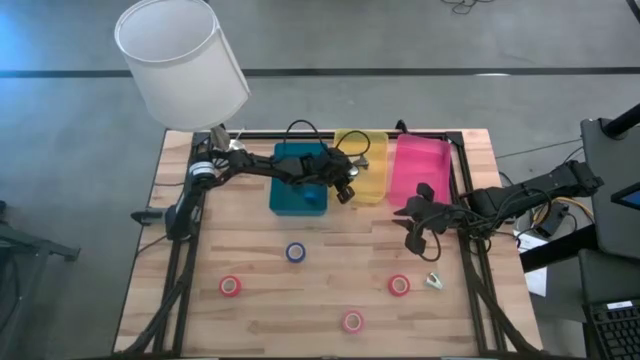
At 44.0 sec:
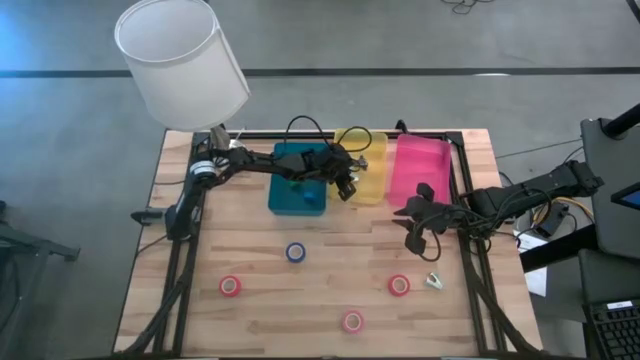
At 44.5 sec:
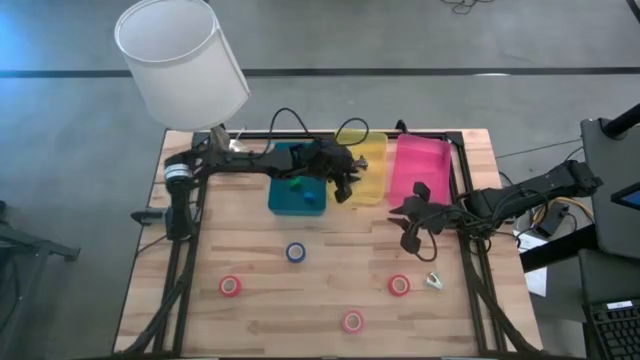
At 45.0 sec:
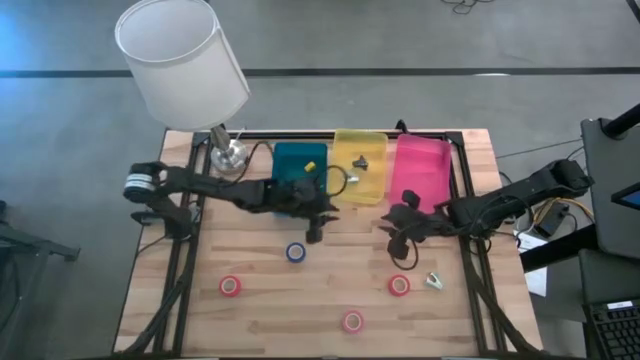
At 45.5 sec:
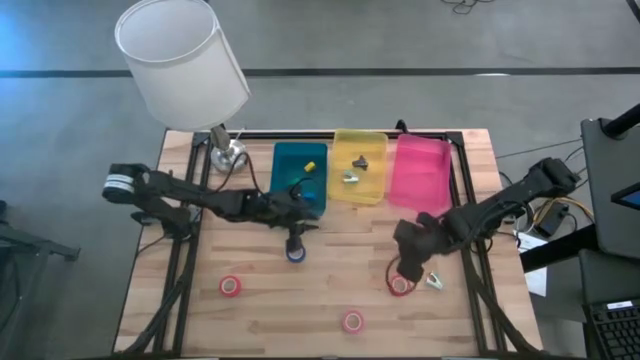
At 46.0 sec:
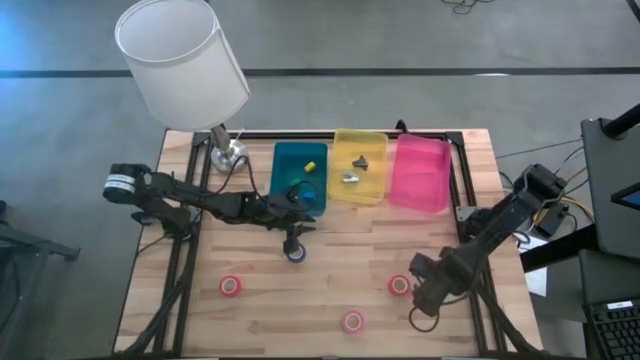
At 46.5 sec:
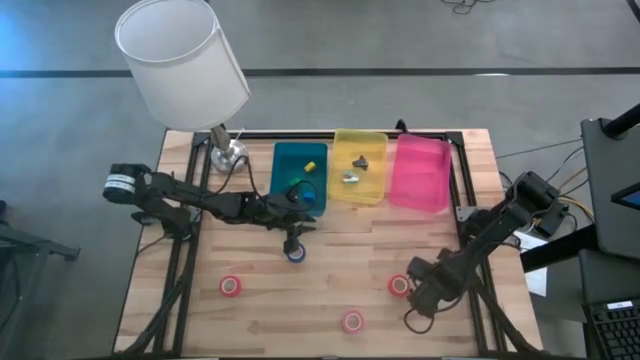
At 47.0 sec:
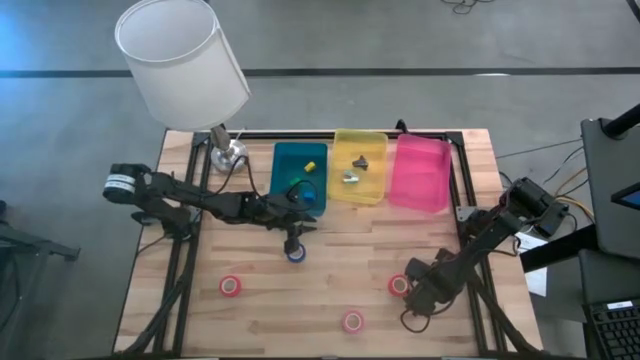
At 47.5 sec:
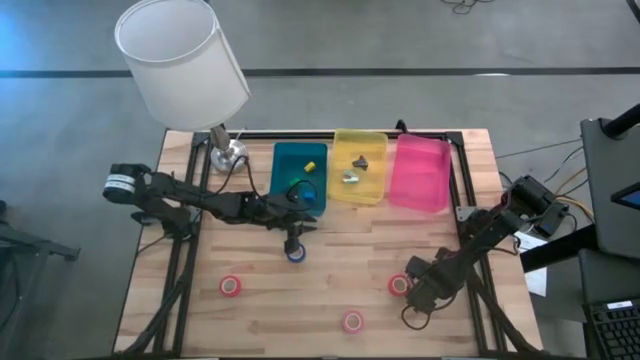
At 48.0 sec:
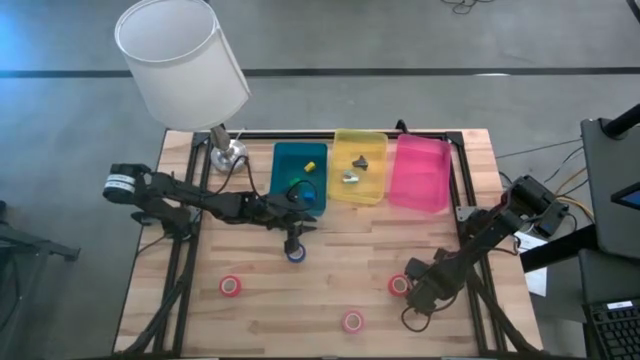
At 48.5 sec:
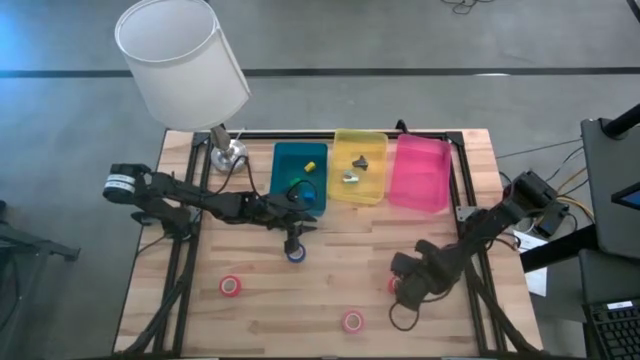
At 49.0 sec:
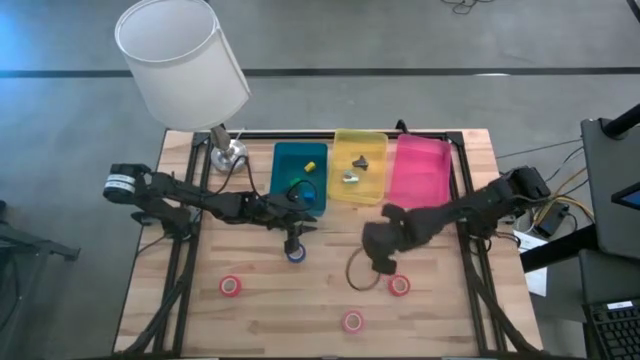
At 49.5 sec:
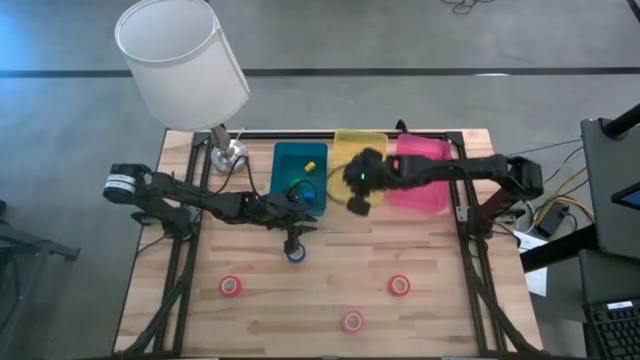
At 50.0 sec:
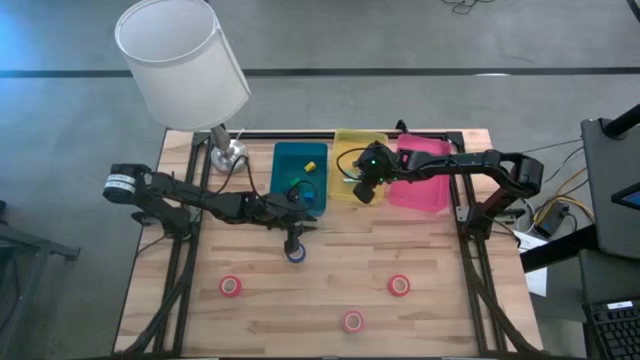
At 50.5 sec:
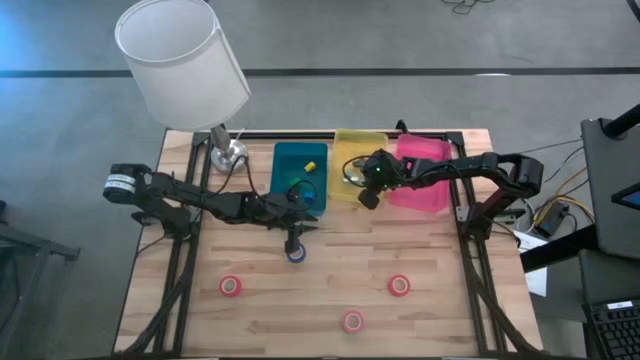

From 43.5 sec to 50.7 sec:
Task: Pick and place Stapler, Stapler remover, tape
Put the blue staple remover into the yellow bin

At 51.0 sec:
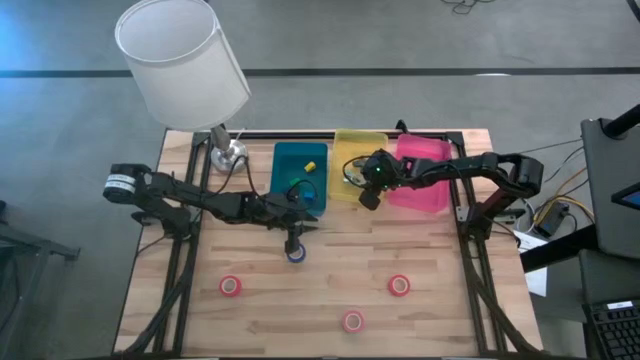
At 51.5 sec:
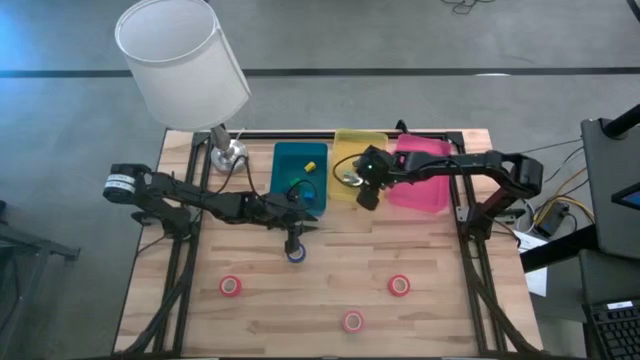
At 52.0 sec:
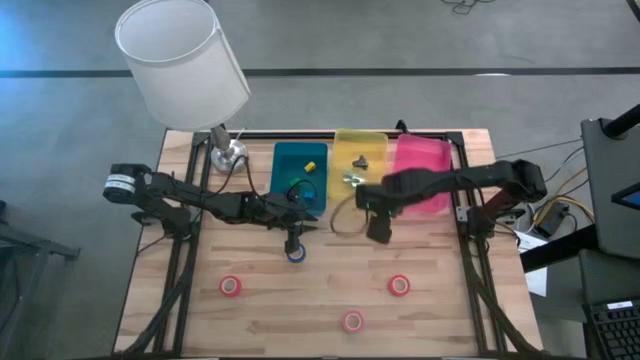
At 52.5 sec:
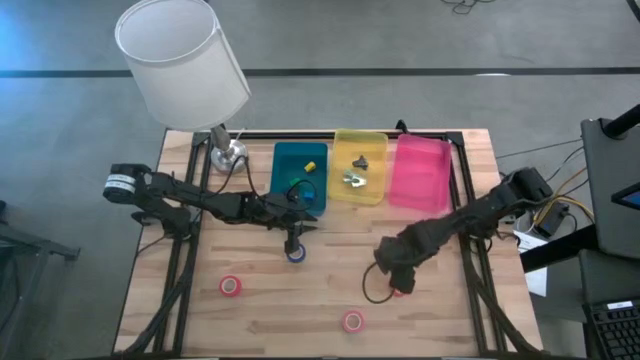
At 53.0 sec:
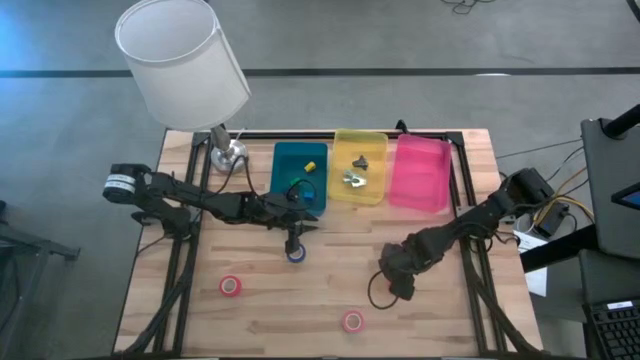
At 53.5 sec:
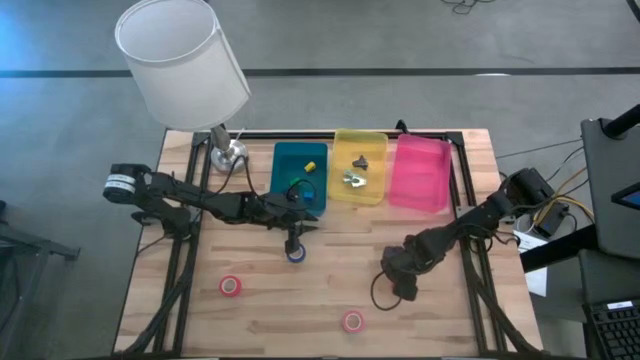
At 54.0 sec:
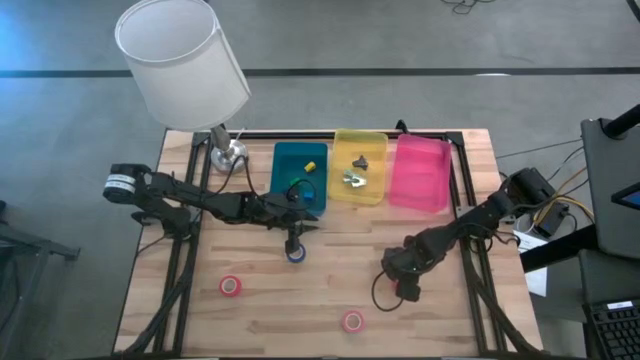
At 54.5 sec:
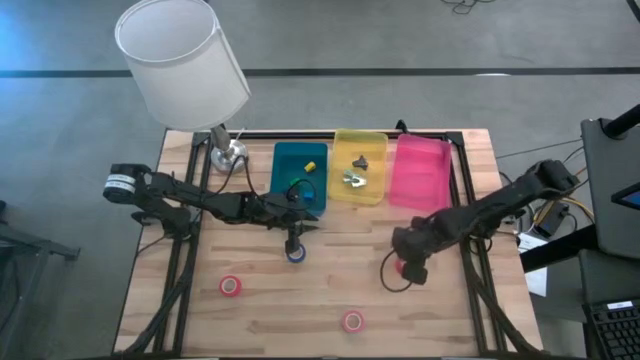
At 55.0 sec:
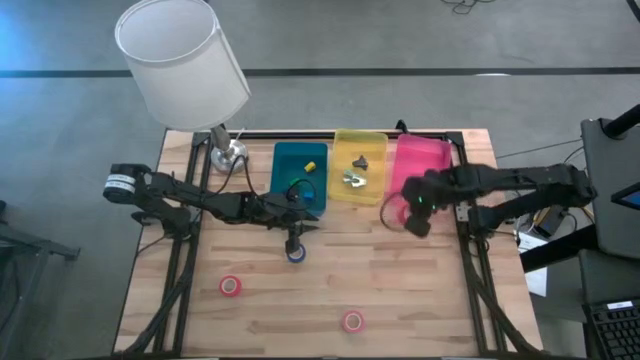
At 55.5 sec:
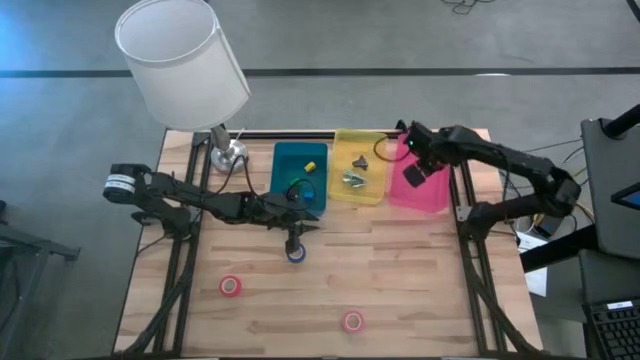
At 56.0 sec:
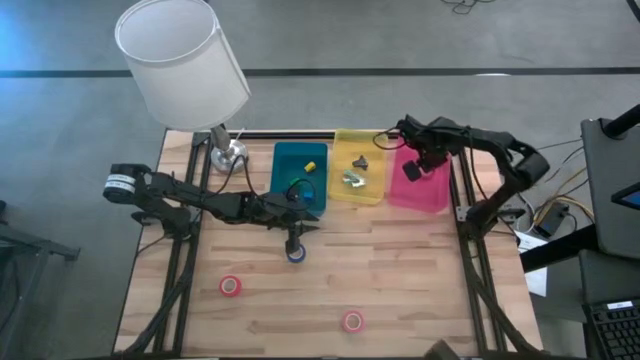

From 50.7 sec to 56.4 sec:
Put the right orange tape on the pink bin

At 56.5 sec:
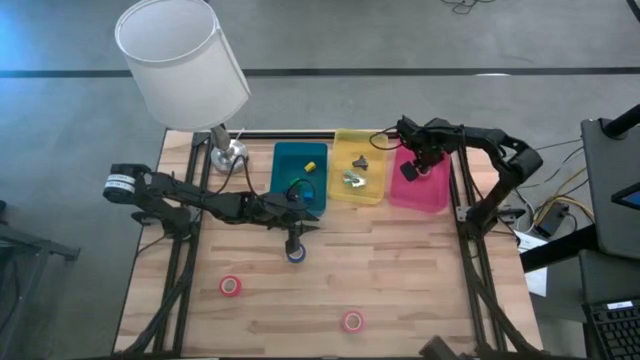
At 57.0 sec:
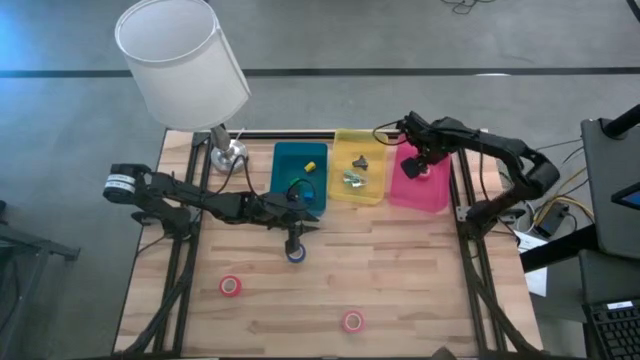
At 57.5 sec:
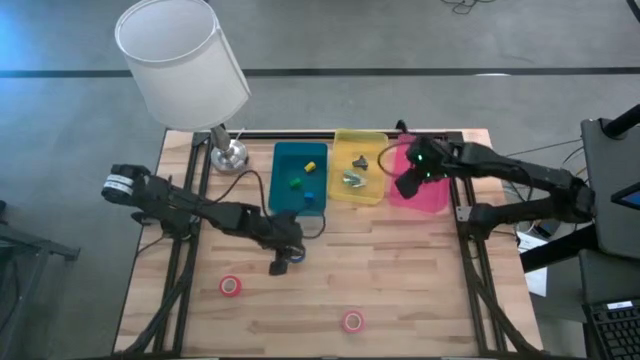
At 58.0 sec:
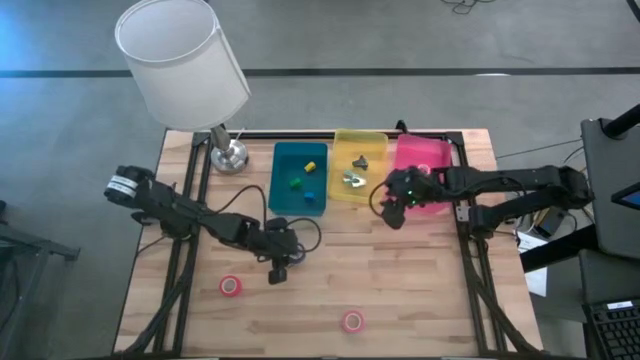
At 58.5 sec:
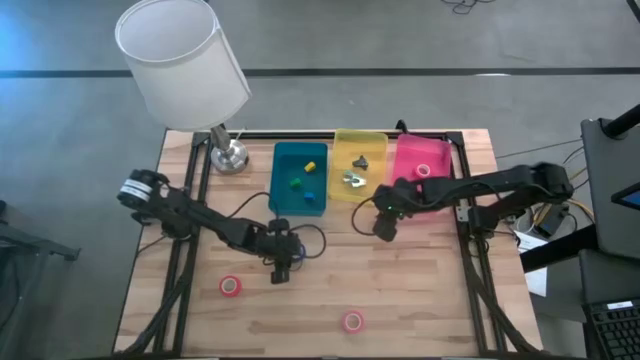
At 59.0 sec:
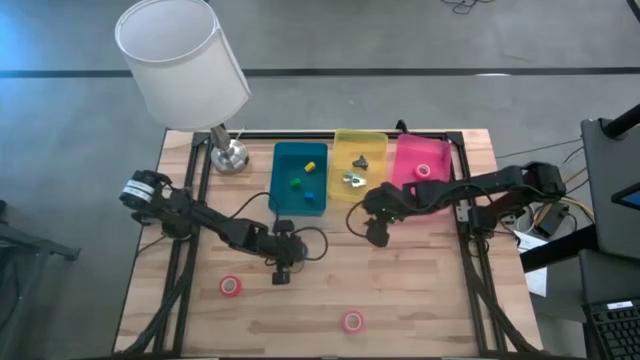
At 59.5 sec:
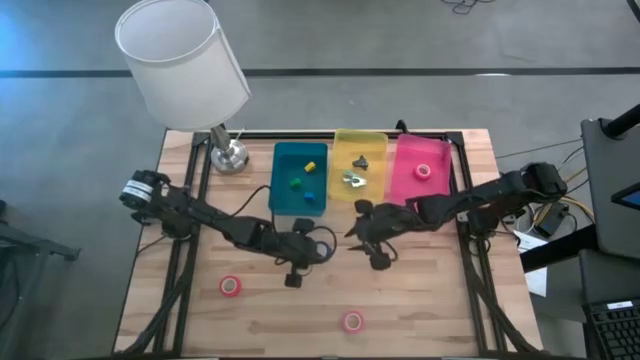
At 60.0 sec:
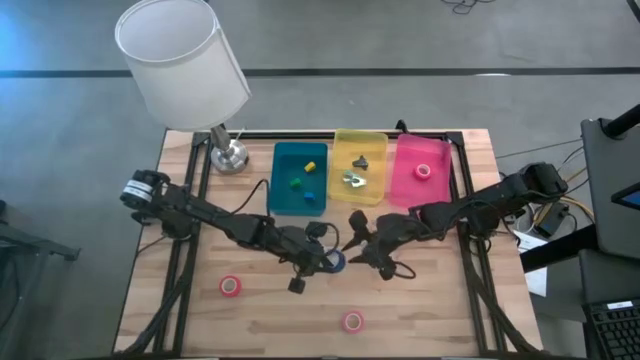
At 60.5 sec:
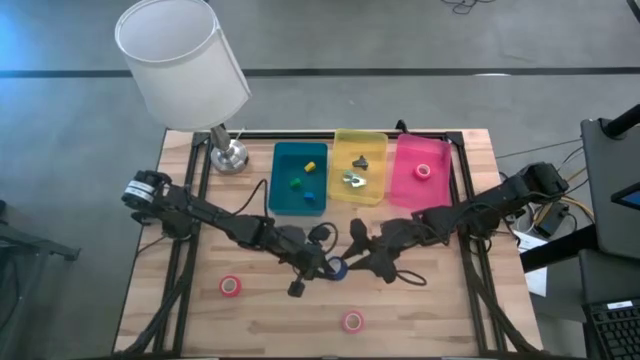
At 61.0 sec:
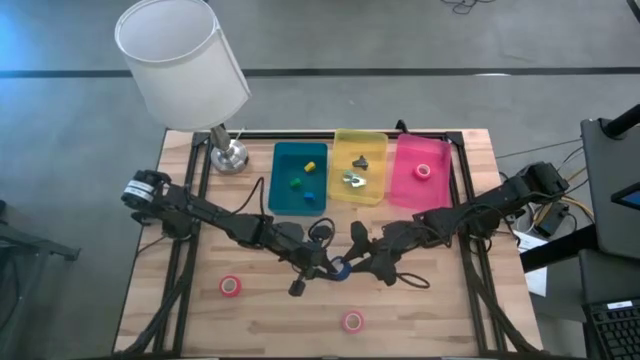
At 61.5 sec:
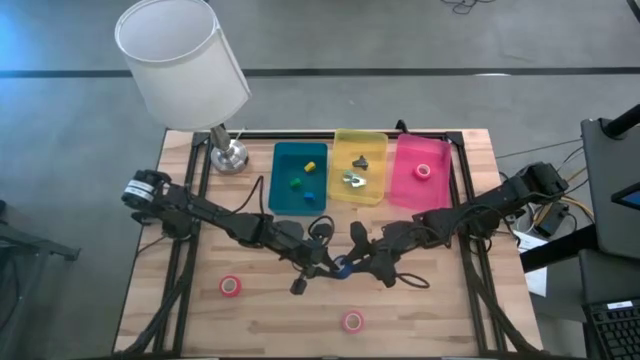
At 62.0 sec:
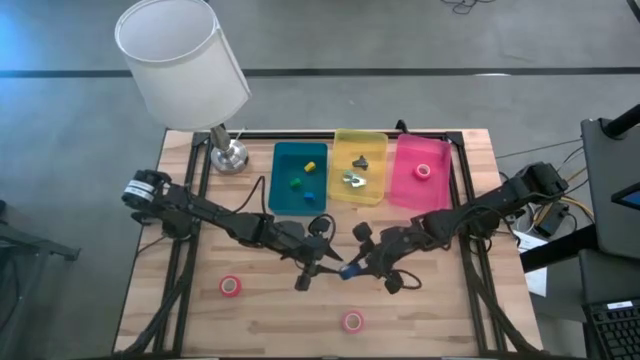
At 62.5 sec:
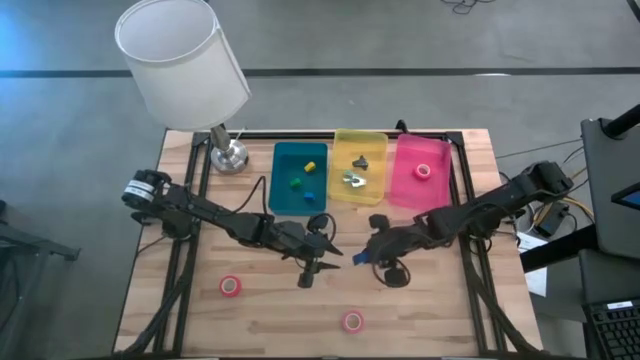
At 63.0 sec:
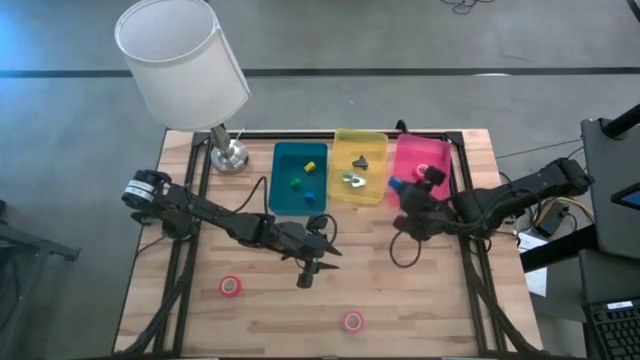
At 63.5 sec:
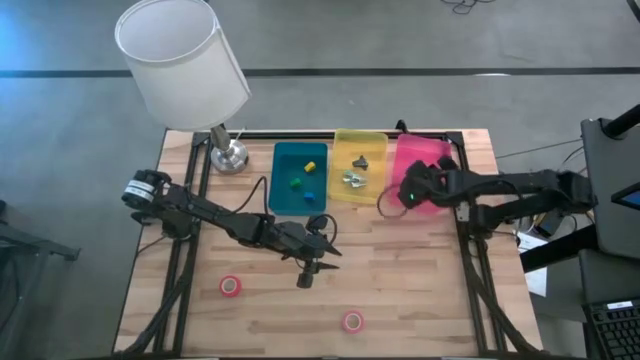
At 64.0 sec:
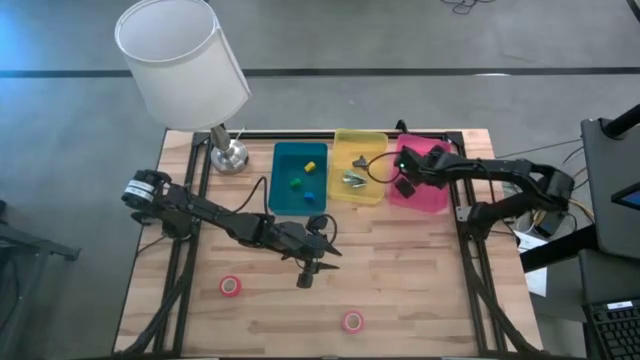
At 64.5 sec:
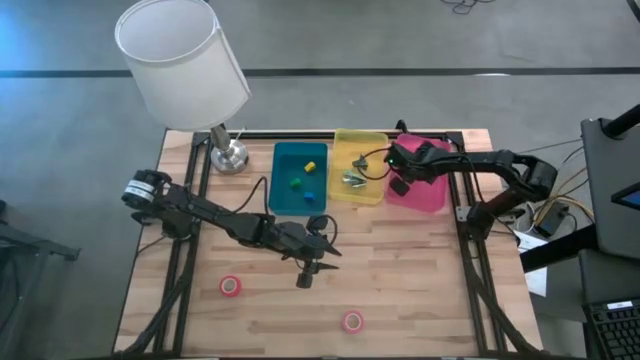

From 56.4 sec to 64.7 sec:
Put the blue tape on the pink bin
